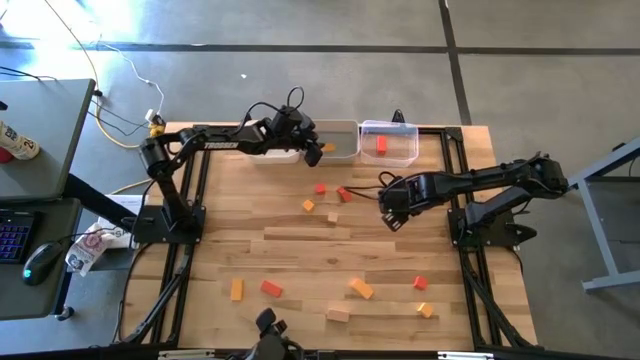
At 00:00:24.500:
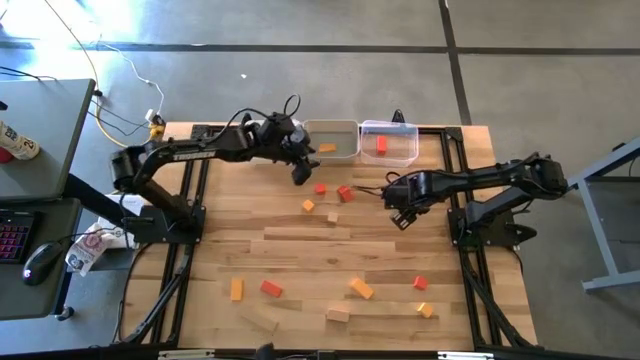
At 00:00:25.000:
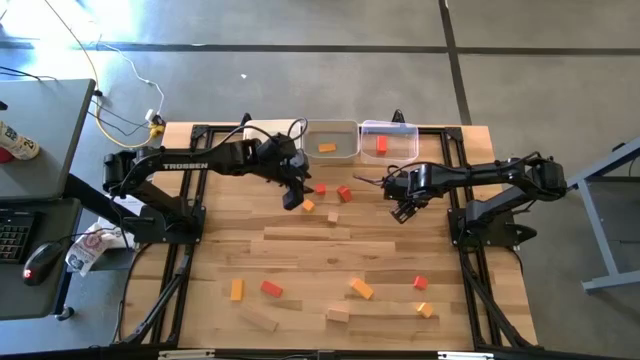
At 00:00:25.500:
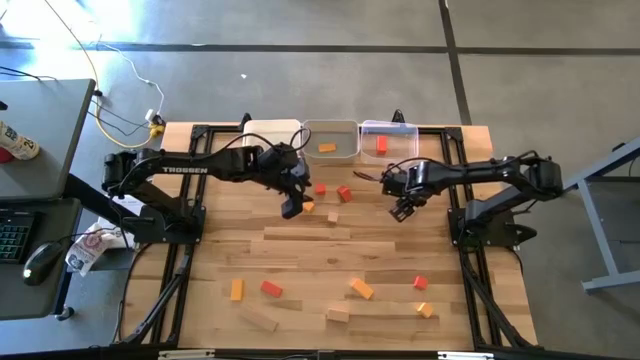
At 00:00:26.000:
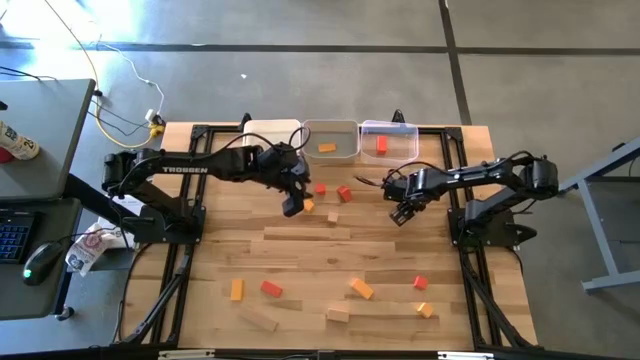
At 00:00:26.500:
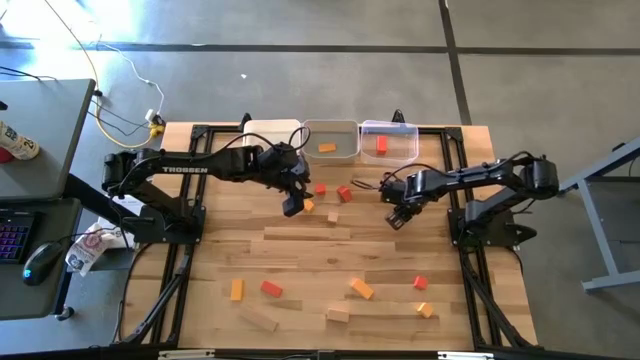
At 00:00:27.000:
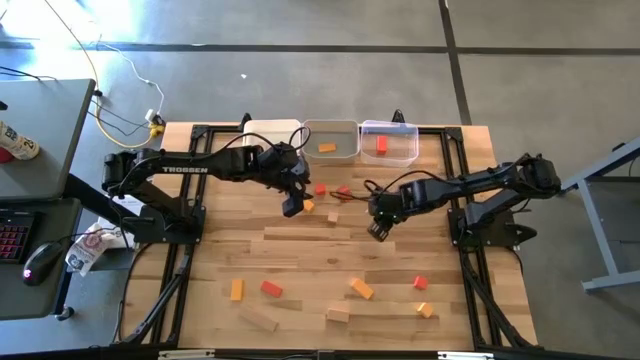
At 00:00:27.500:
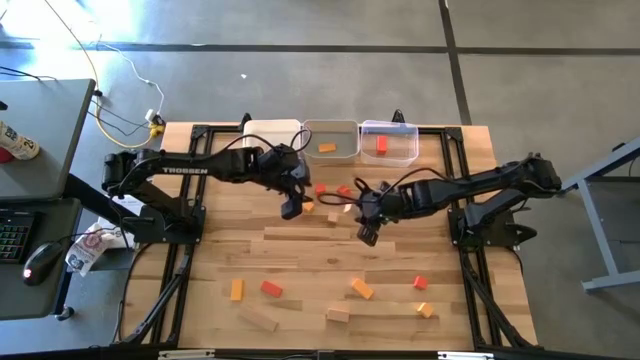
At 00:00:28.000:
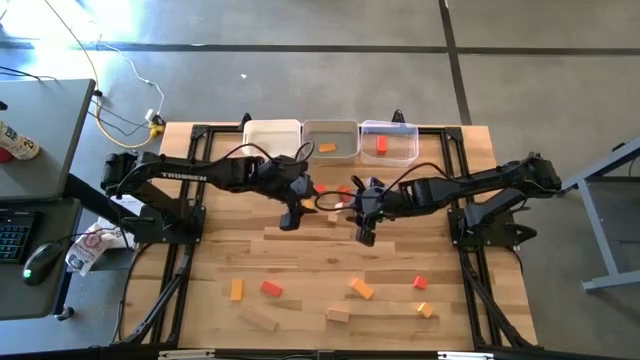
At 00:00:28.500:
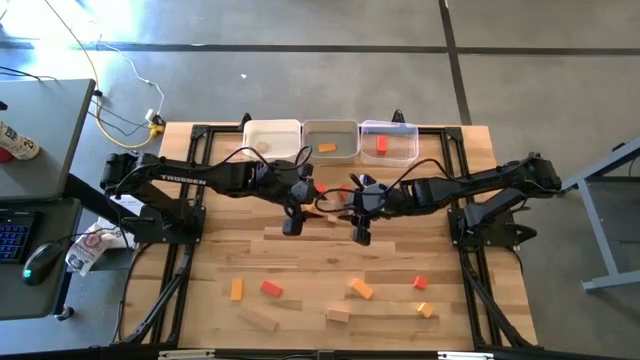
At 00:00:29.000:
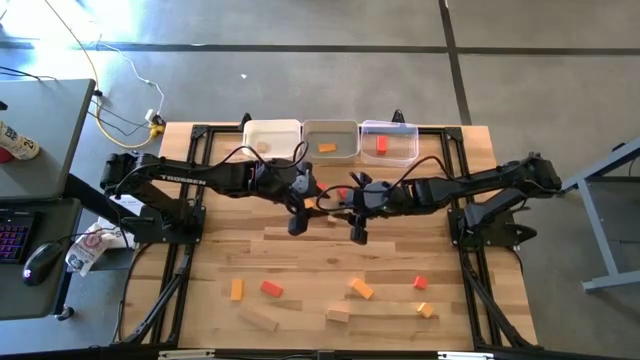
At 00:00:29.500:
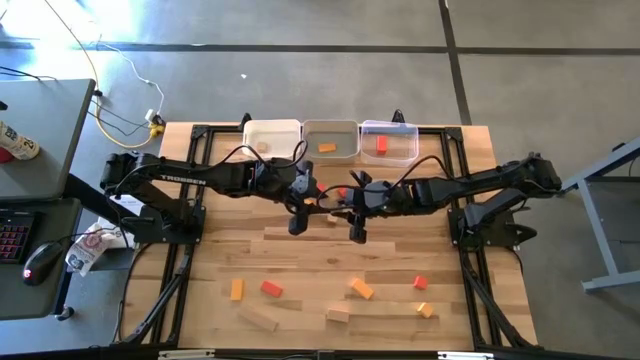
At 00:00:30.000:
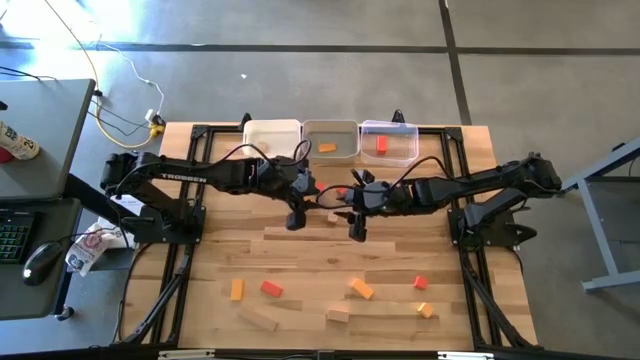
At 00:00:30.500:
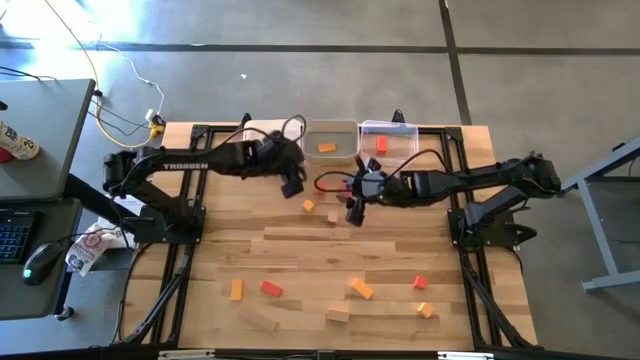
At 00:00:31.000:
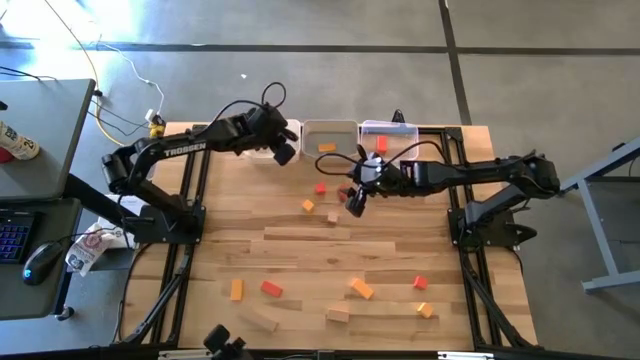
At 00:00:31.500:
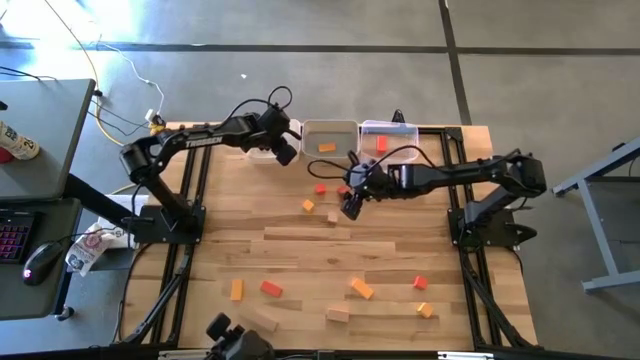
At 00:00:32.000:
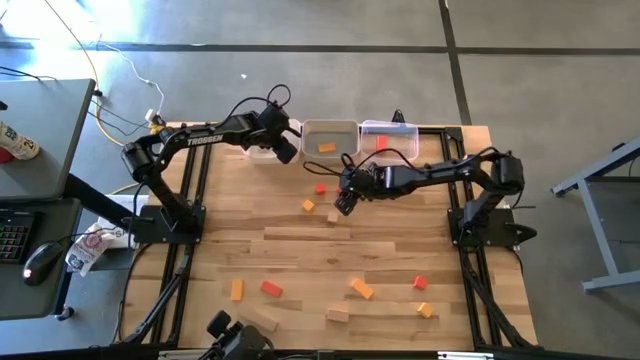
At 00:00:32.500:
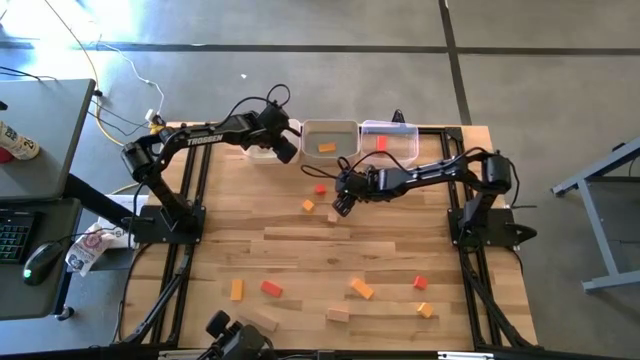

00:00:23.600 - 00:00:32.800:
Task: Sort & place blocks by color
Put the brown block into the white bin

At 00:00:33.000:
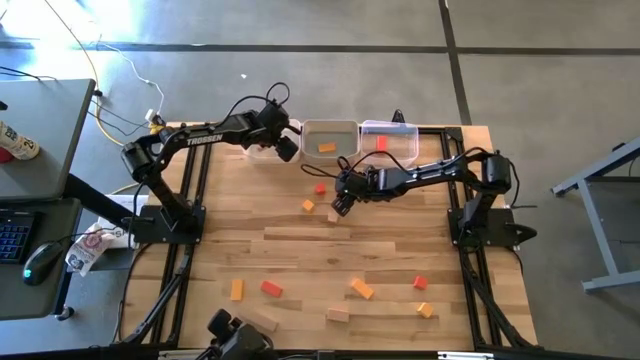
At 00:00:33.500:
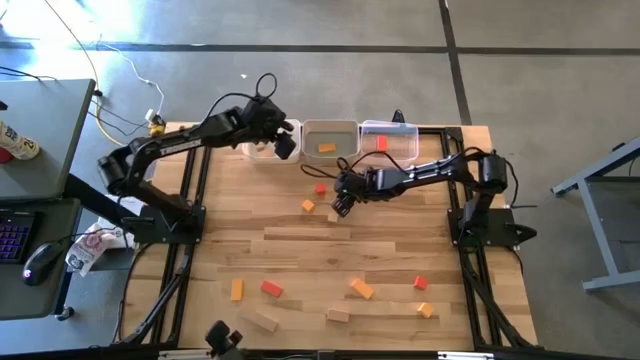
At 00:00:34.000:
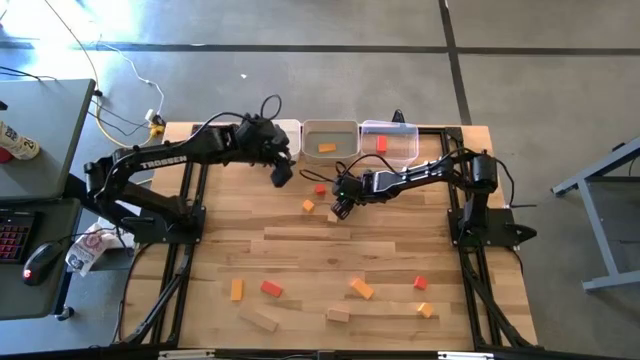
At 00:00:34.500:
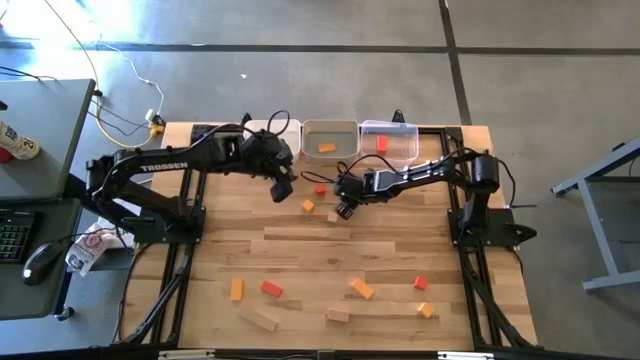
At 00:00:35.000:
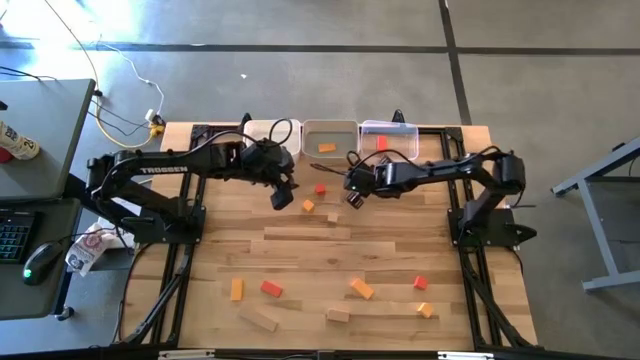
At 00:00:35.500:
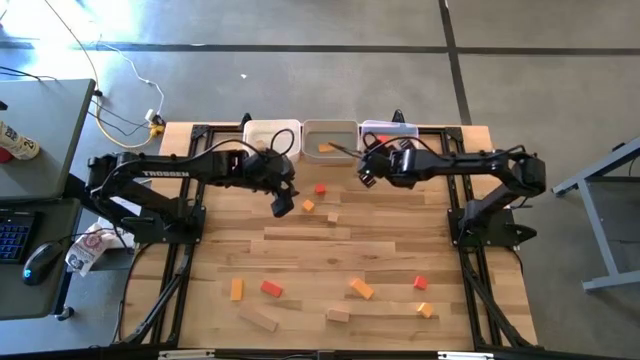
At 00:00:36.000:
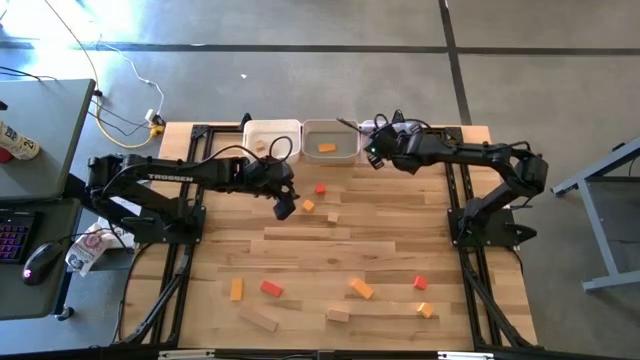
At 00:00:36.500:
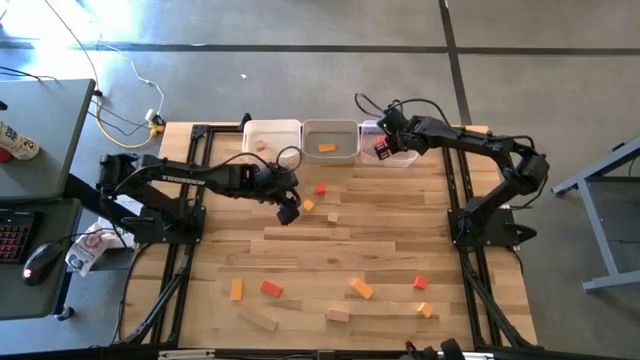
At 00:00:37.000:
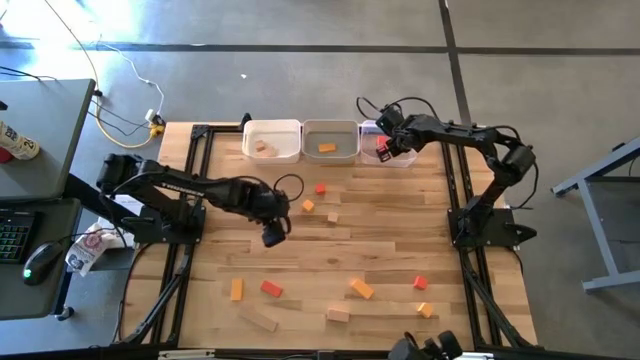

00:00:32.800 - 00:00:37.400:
Put the orange block into the transparent bin

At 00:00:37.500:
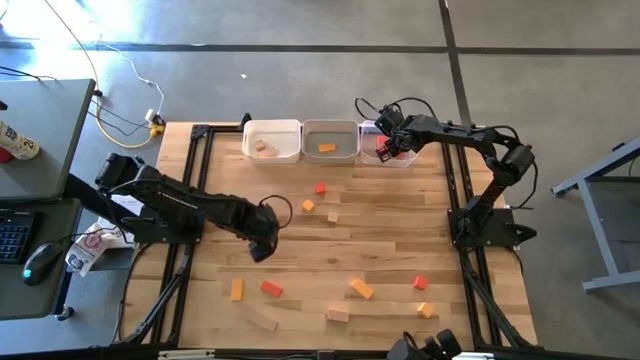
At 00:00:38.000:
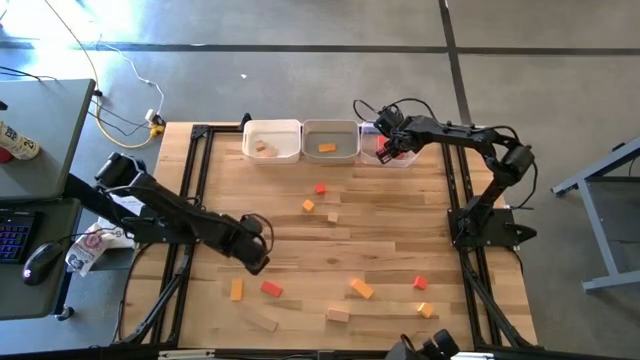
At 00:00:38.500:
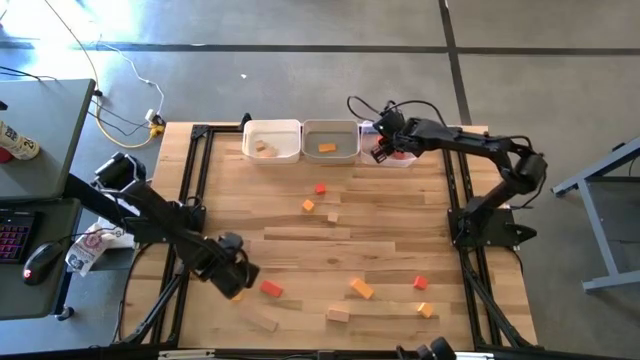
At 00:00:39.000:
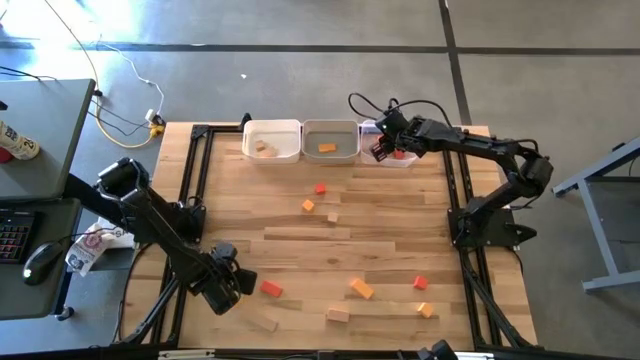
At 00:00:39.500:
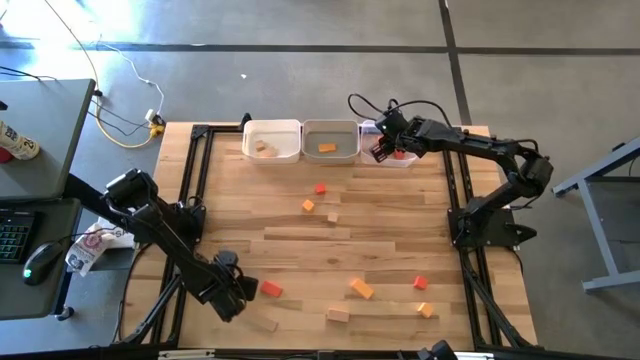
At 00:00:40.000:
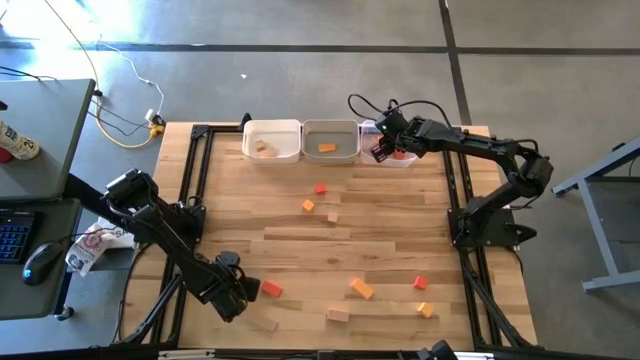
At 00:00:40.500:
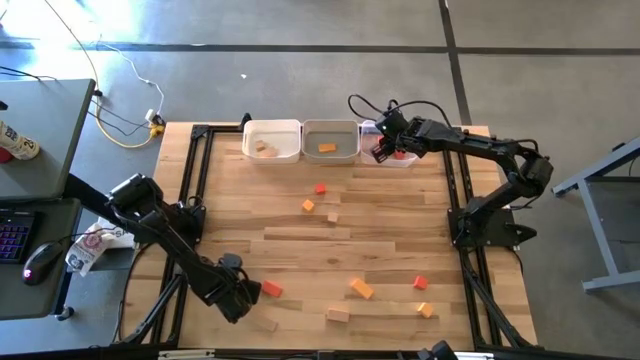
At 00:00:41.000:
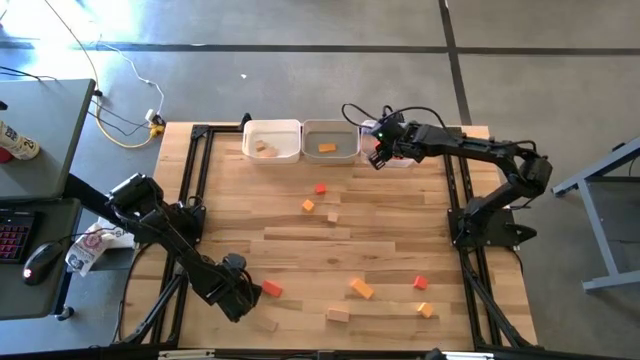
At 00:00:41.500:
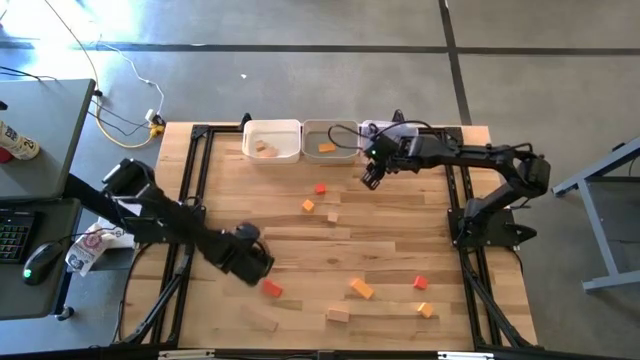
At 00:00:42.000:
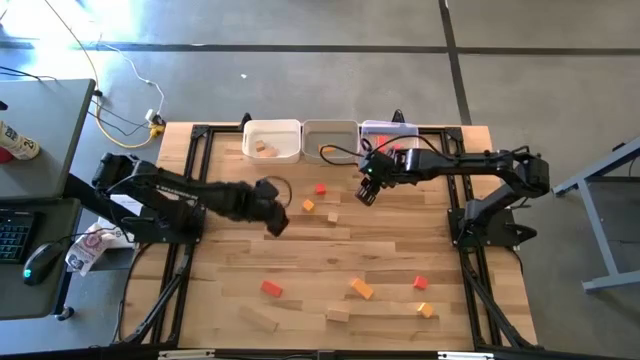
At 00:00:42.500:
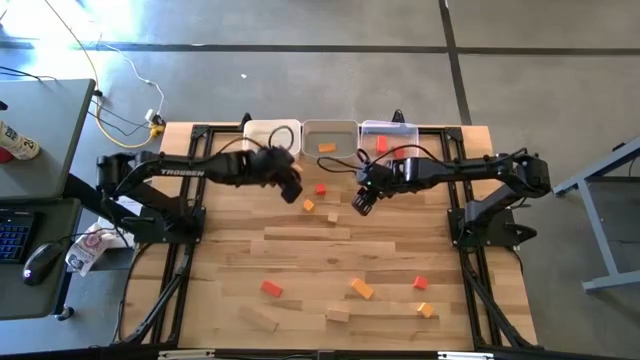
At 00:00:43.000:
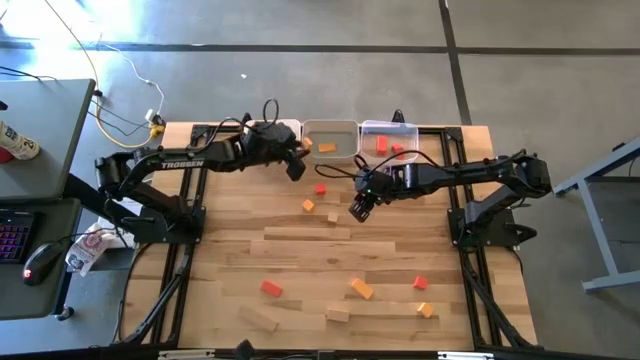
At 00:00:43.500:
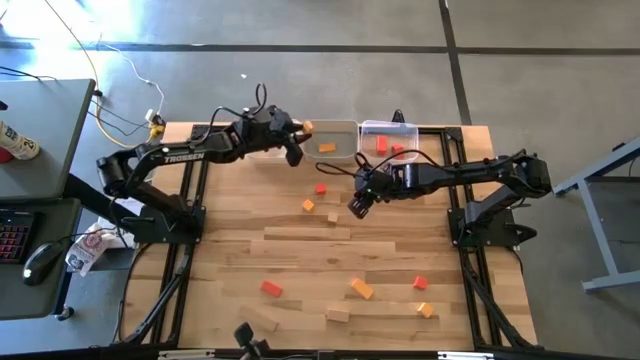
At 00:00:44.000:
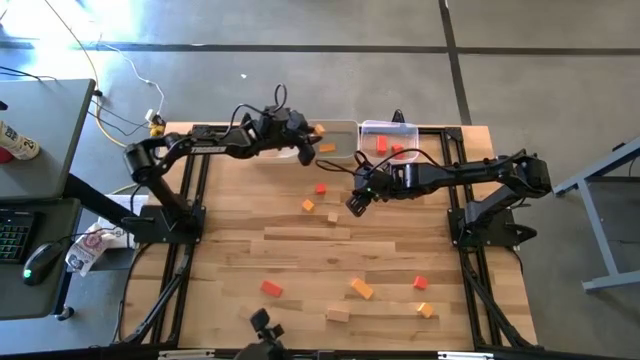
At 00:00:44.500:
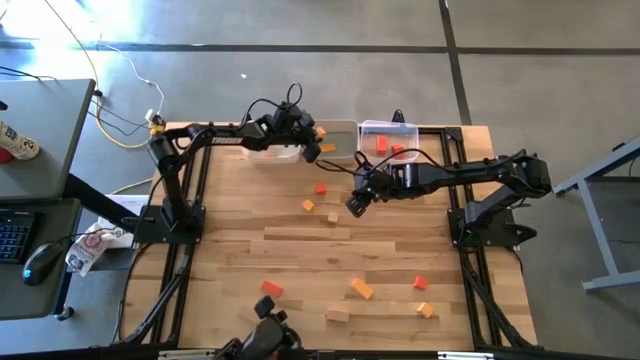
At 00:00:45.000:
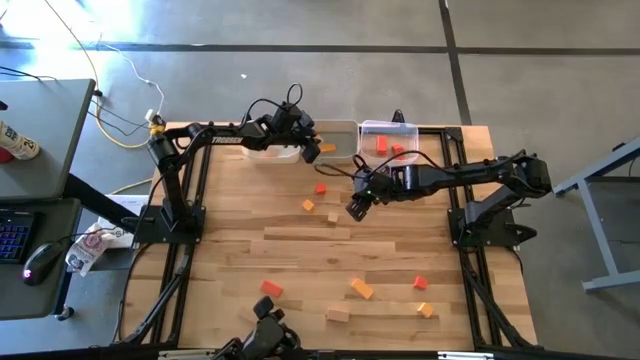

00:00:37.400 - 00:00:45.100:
Put the yellow block into the gray bin
